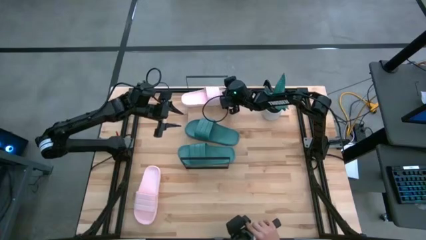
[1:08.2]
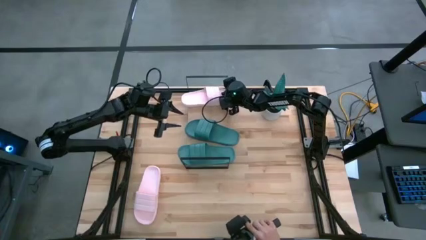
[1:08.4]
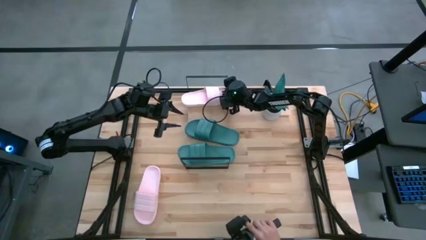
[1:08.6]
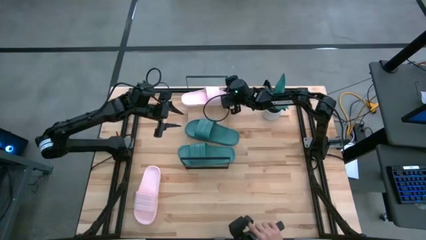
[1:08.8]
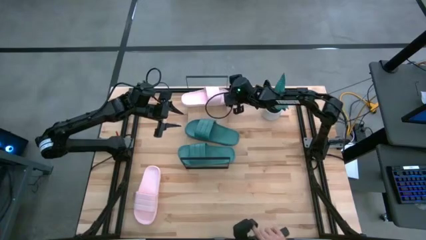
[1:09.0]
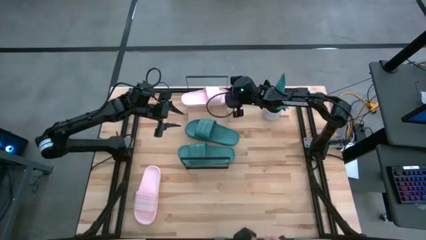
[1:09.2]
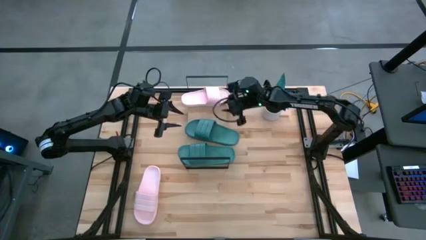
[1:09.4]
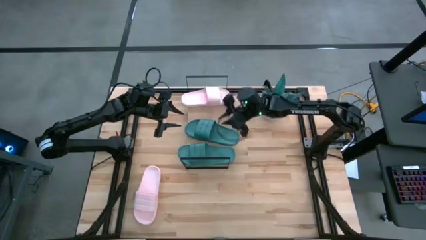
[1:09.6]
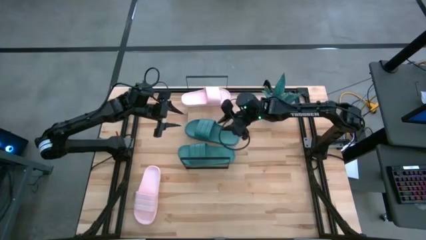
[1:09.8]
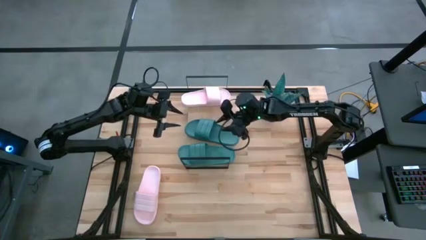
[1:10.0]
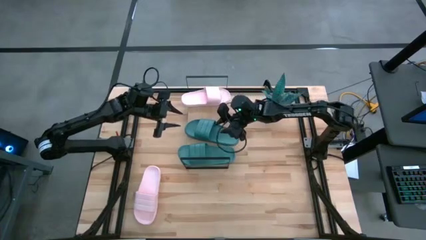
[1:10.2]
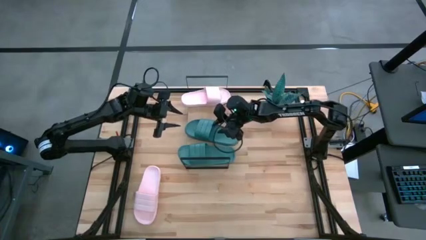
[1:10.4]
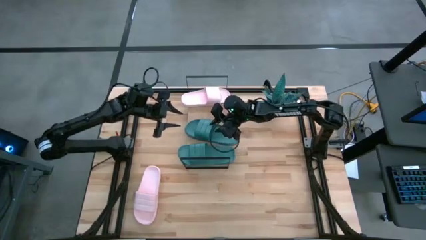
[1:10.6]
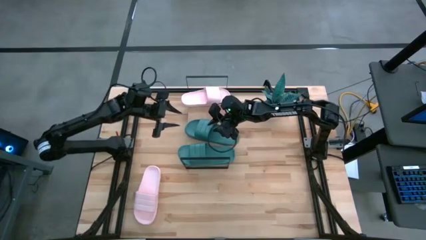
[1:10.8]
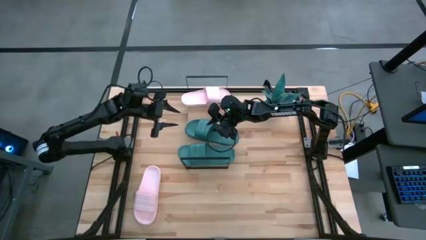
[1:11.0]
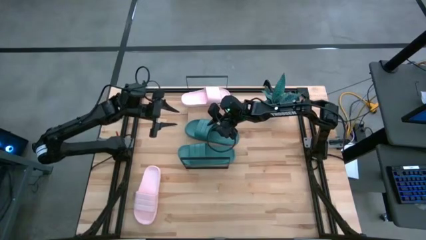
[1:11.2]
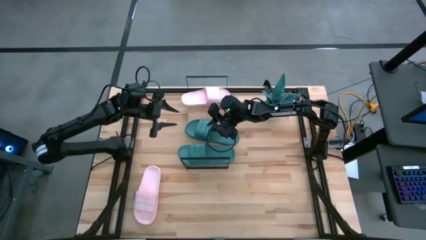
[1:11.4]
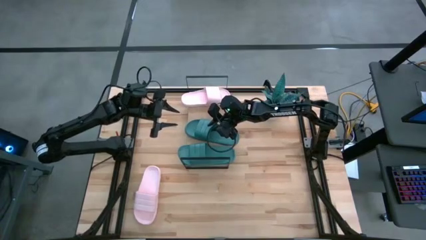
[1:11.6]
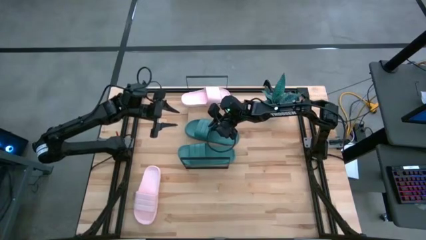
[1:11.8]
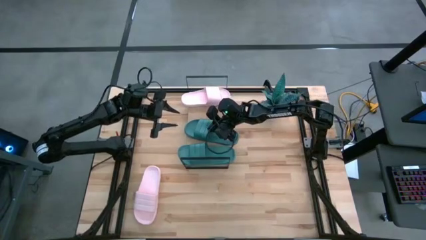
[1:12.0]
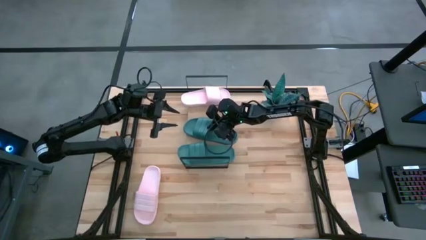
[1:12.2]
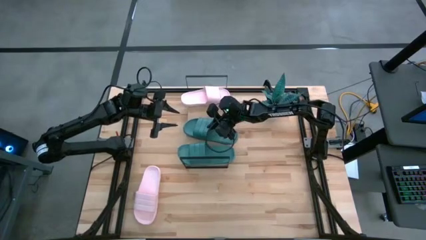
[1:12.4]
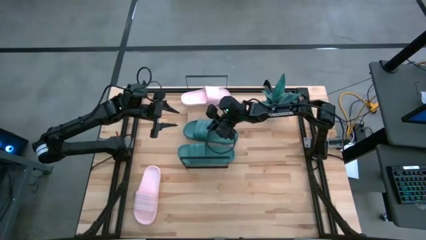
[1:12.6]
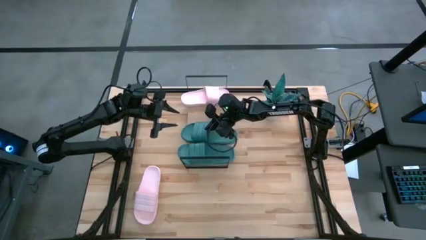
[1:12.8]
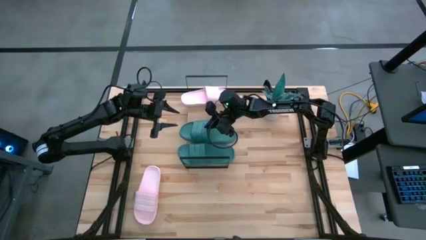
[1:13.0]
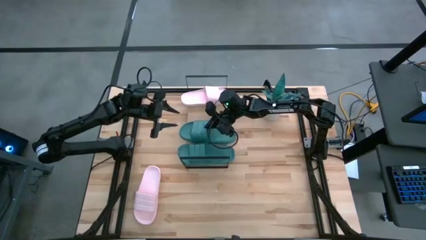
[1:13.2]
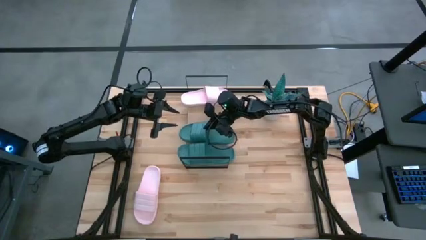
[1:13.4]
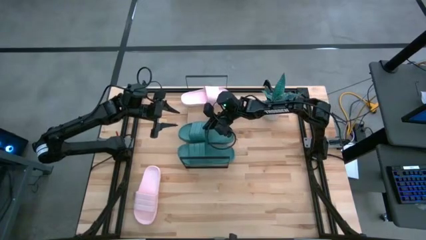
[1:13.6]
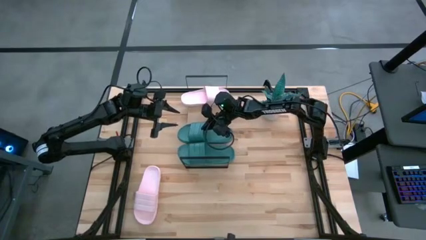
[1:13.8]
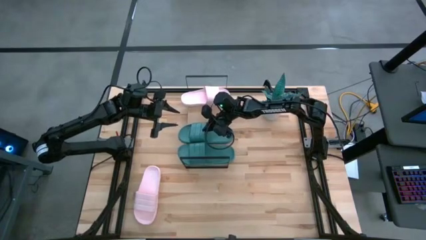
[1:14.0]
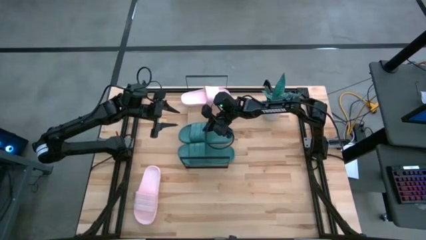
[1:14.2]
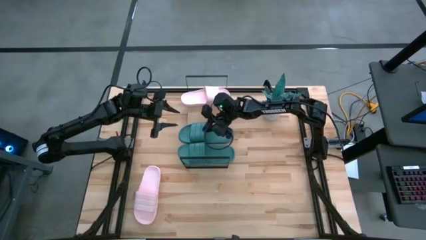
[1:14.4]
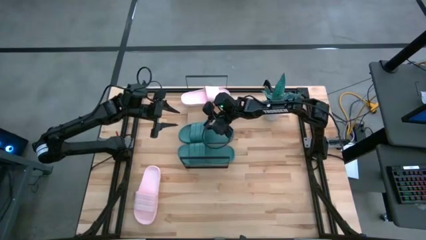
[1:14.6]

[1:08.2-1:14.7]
Task: Pick and place slides into the shelf
Adjust the top green slipper on the shelf

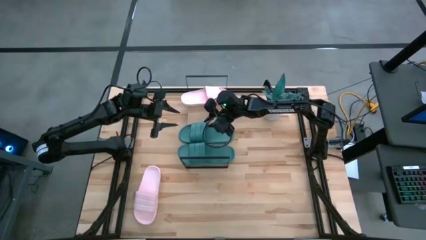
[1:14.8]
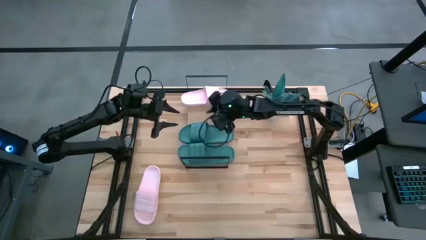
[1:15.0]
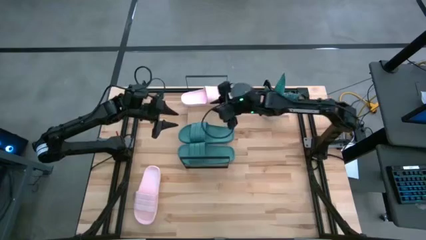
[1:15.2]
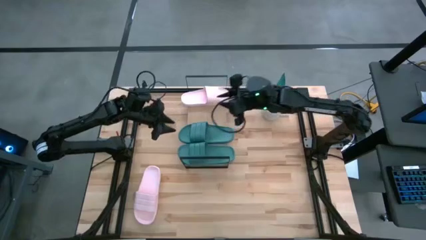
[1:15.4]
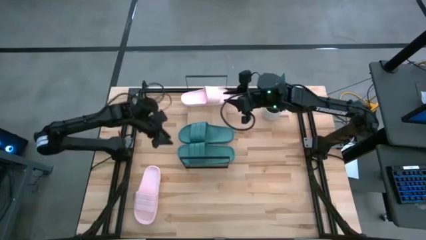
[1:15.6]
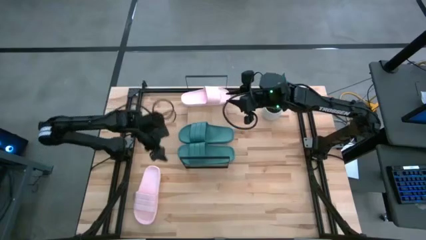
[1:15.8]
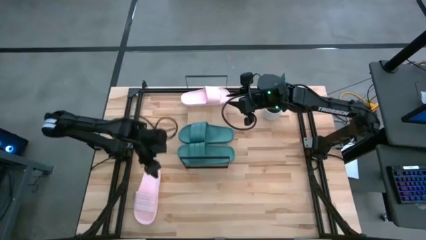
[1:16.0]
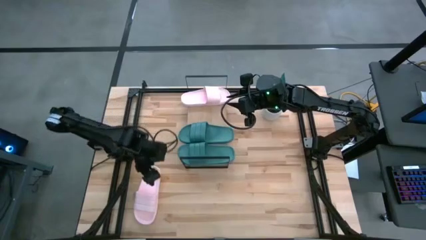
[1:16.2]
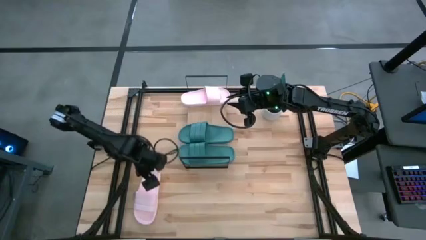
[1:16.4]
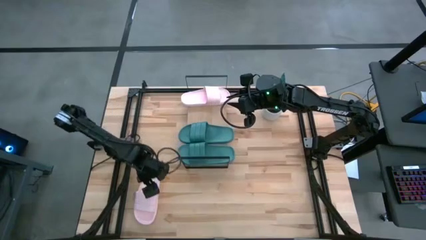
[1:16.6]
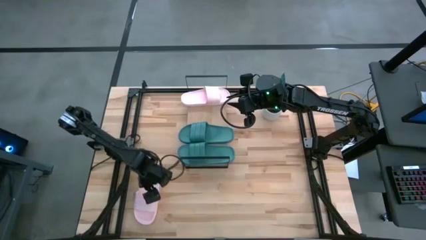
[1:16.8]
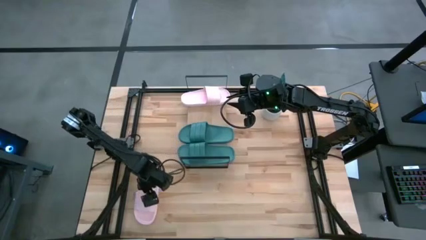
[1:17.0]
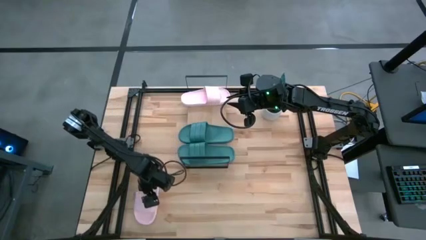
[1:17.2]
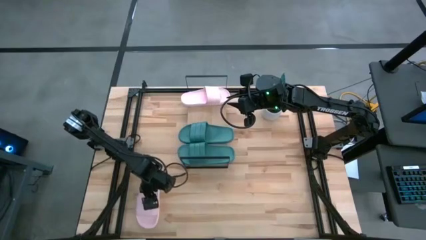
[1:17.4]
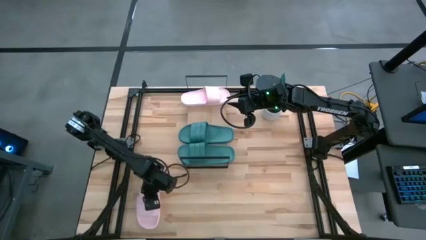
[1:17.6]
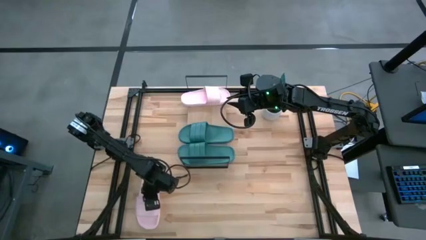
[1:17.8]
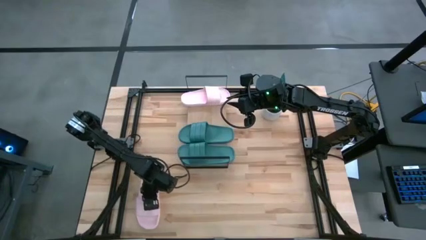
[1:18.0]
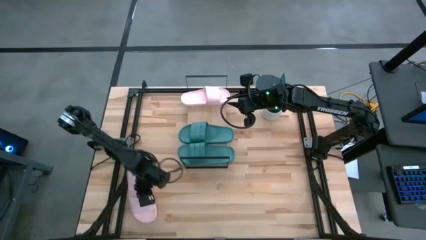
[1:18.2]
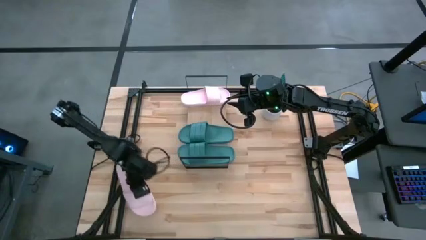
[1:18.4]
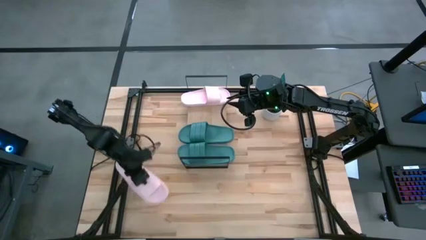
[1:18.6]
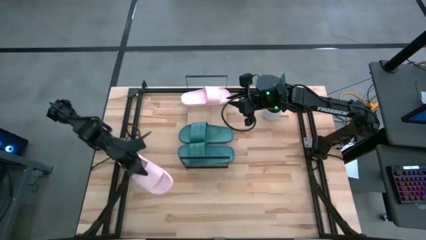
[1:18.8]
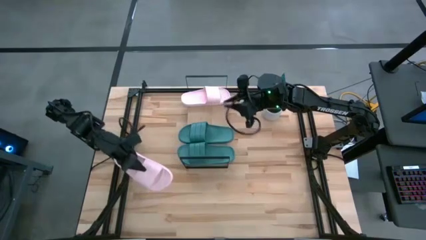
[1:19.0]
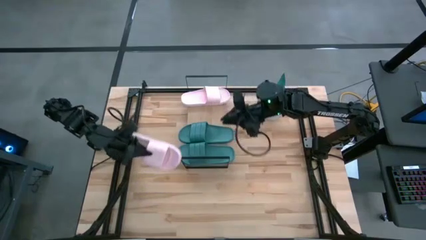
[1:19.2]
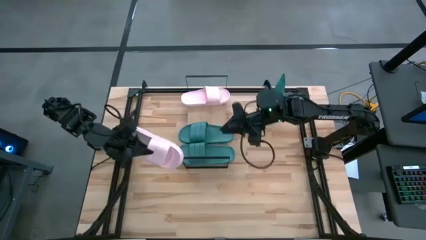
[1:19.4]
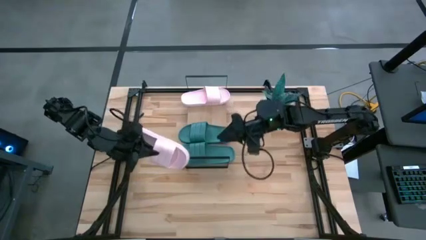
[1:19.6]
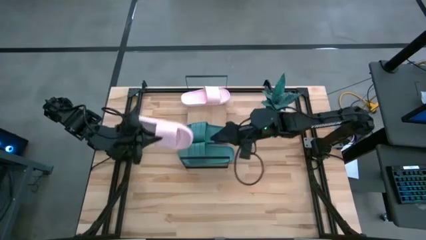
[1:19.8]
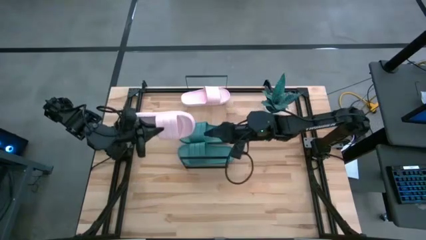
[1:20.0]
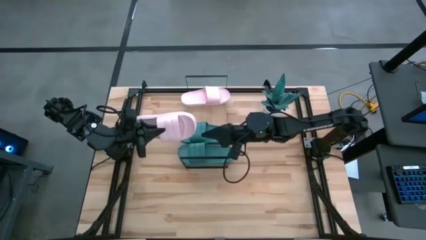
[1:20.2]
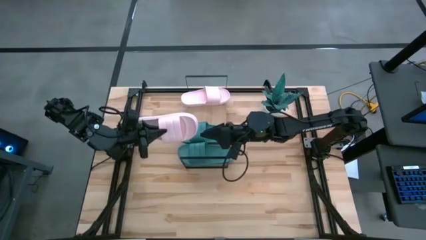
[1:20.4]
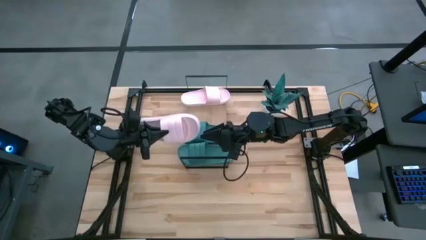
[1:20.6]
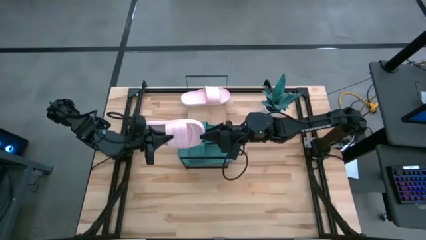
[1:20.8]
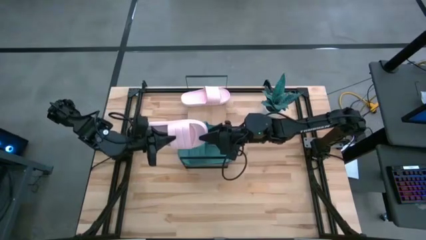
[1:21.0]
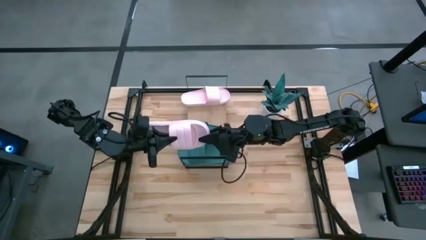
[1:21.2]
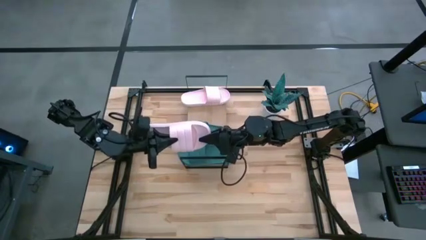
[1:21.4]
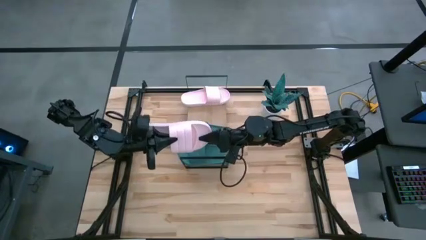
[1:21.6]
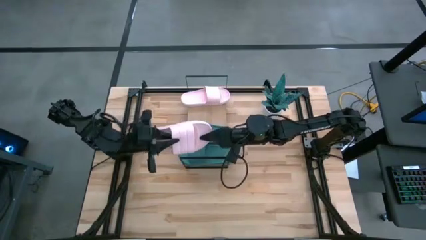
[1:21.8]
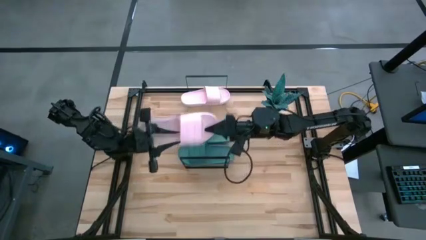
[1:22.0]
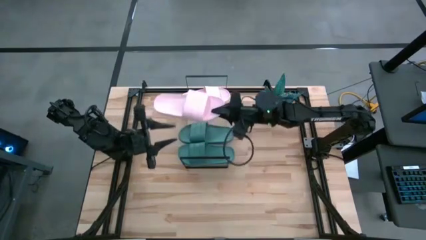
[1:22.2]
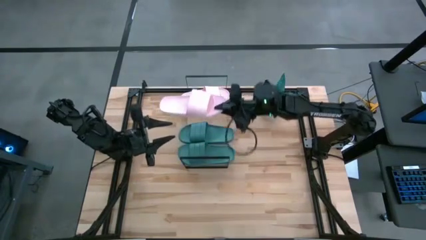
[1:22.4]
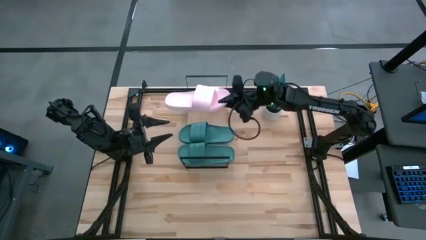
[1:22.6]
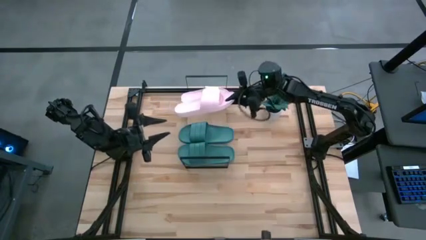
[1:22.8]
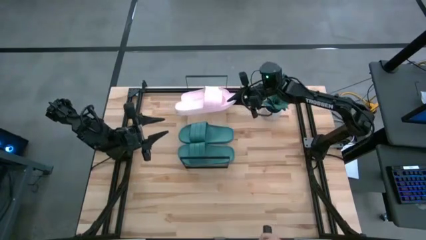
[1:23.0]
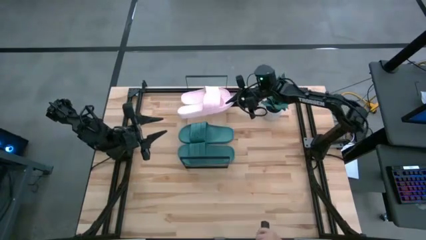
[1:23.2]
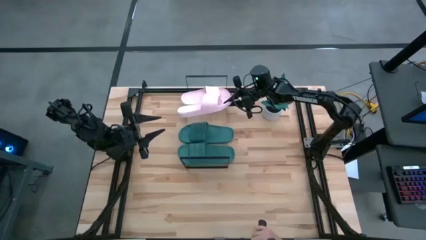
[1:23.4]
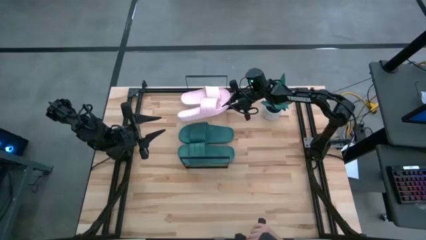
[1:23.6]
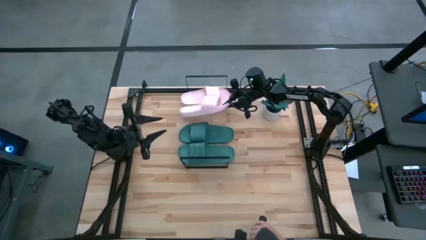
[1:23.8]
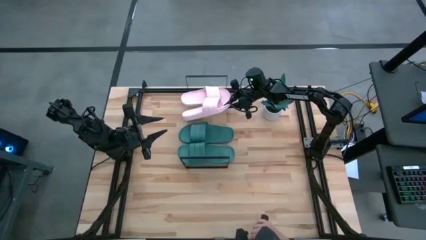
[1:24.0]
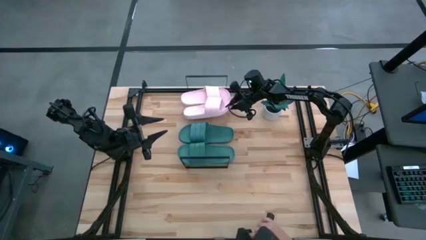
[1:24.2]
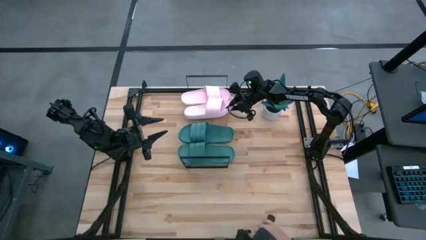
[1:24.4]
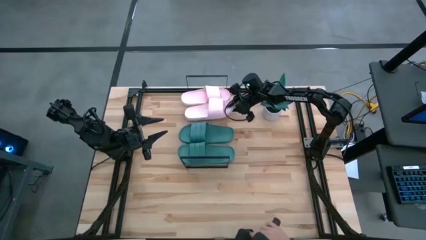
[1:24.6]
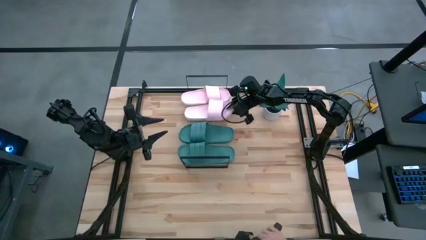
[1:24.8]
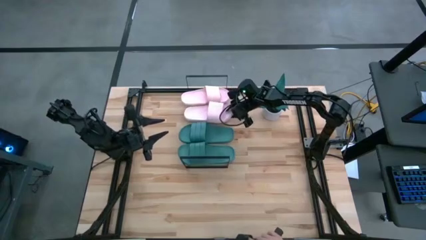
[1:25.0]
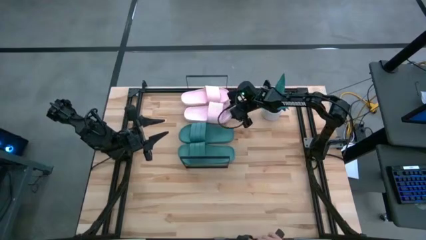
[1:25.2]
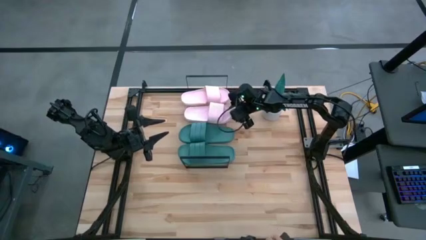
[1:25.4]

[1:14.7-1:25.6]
Put the pink slipper on the shelf
